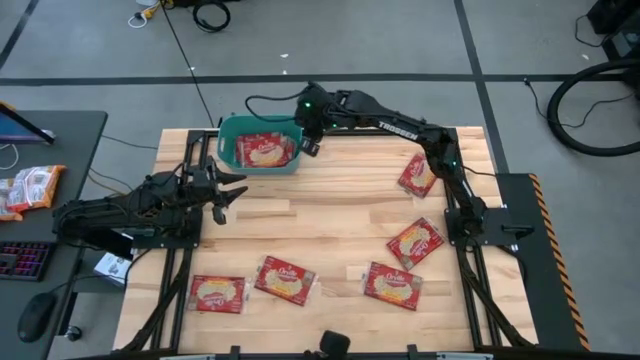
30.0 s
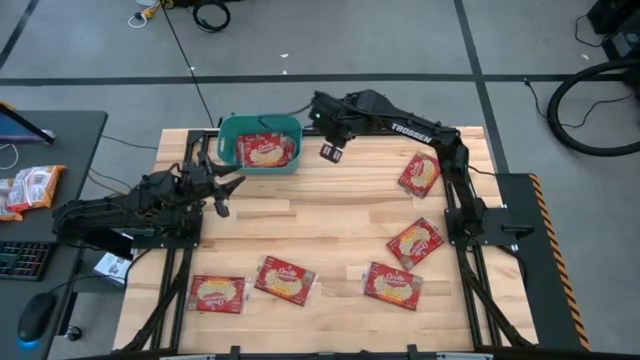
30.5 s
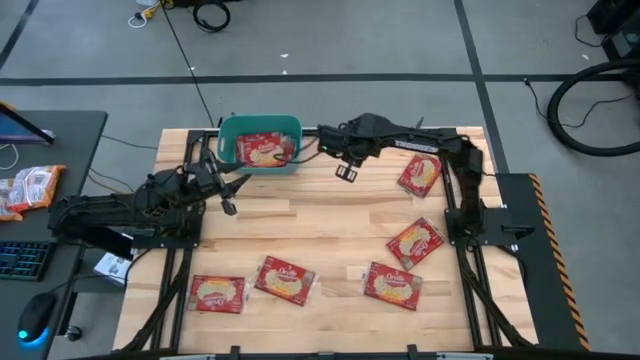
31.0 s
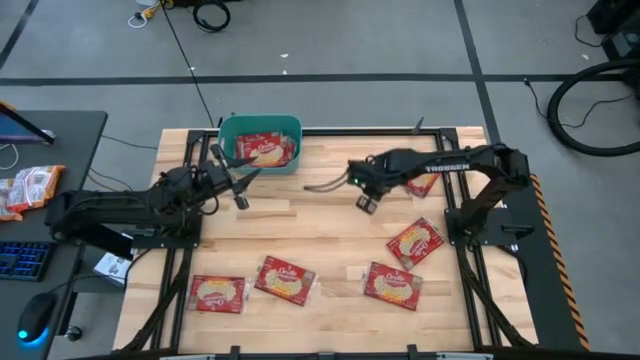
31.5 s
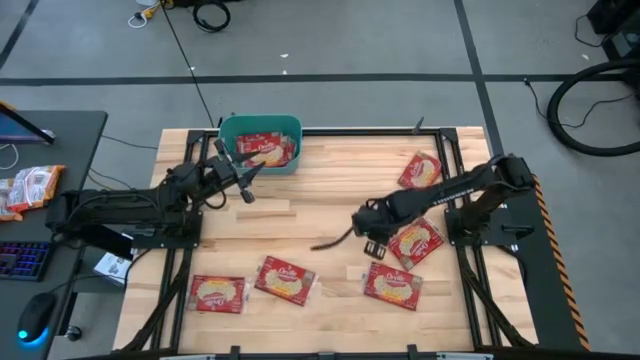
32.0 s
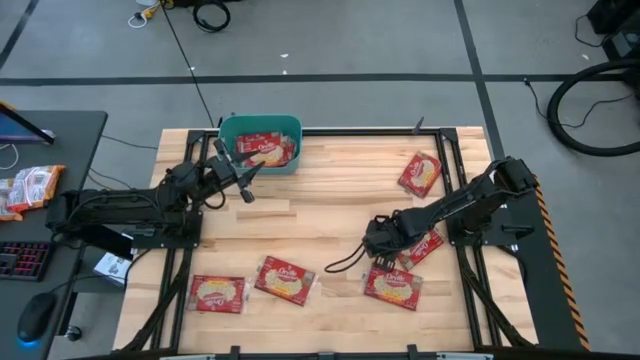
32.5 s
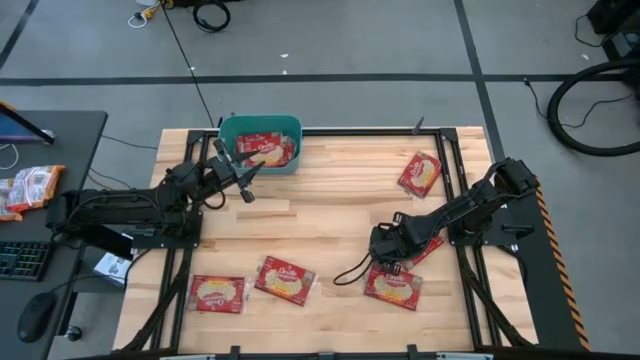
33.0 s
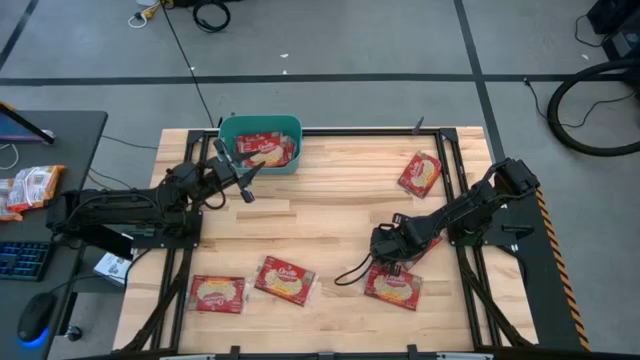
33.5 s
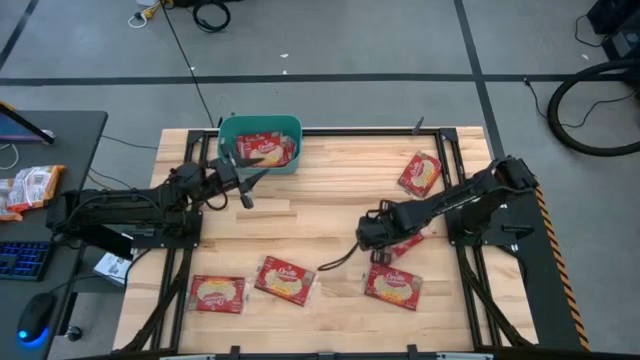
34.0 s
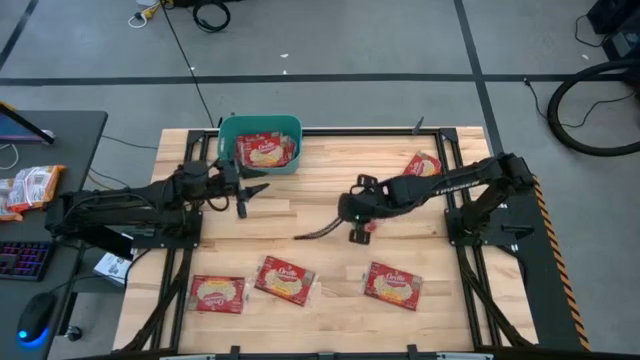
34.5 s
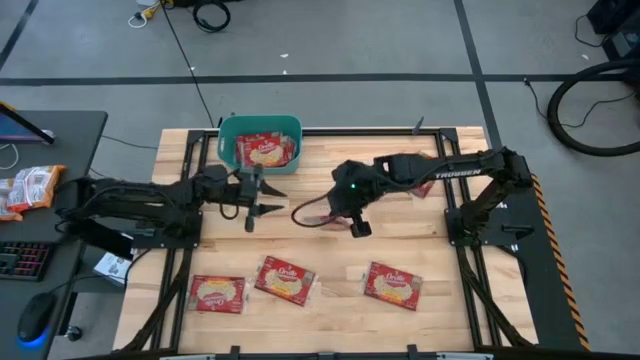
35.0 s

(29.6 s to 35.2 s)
Task: Sort popcorn bags into baskets
Put the popcorn bag into the bin

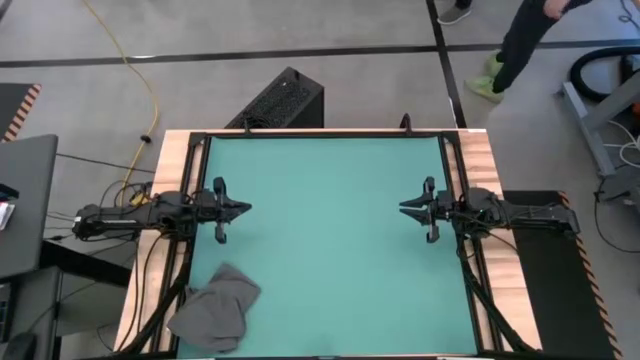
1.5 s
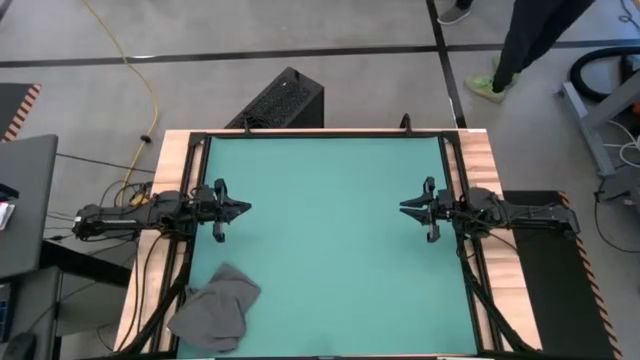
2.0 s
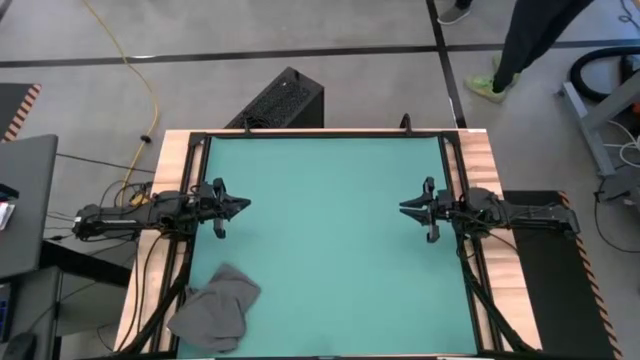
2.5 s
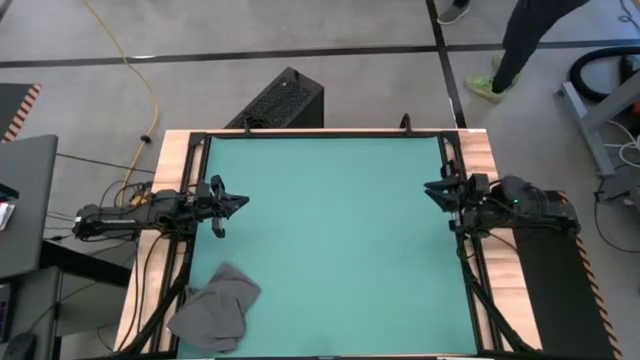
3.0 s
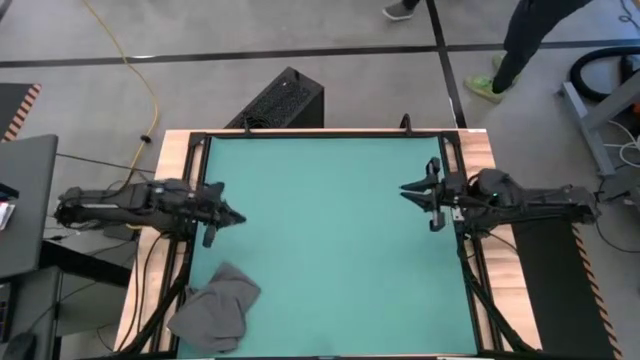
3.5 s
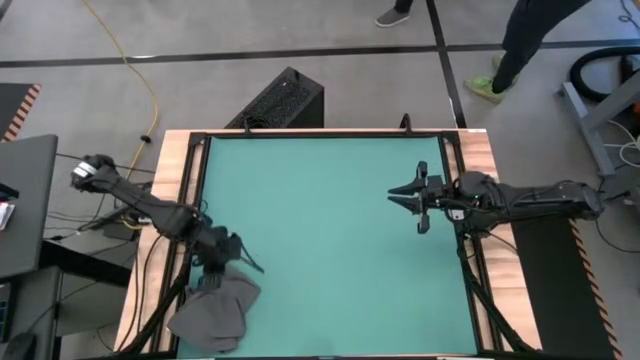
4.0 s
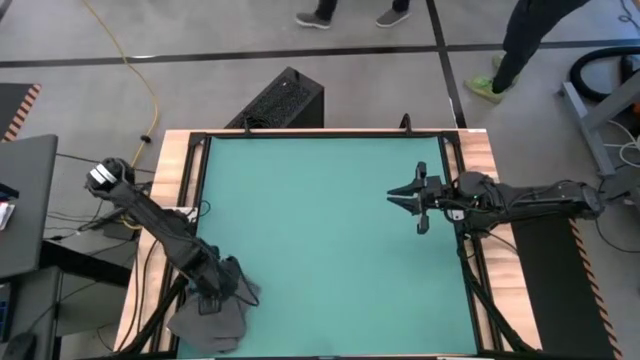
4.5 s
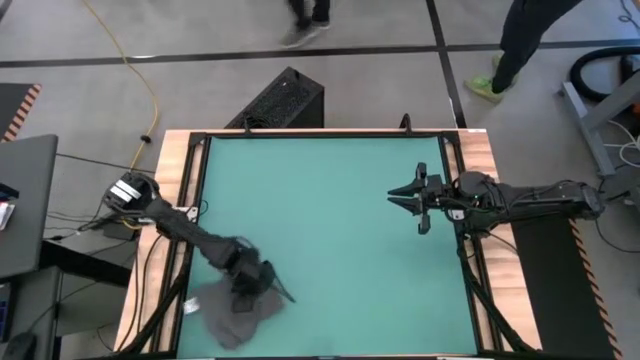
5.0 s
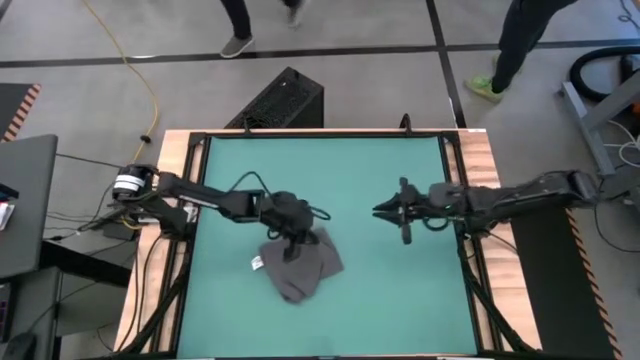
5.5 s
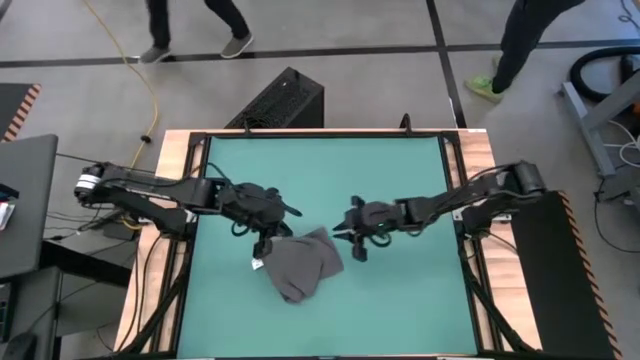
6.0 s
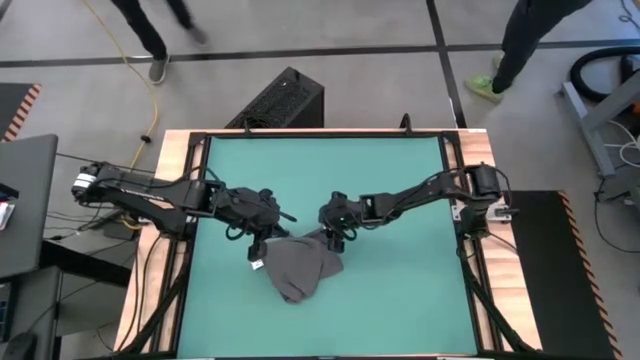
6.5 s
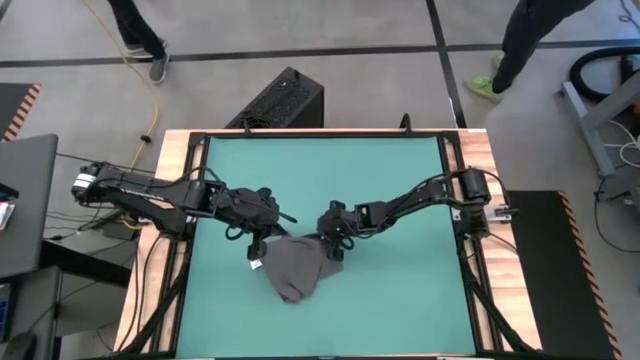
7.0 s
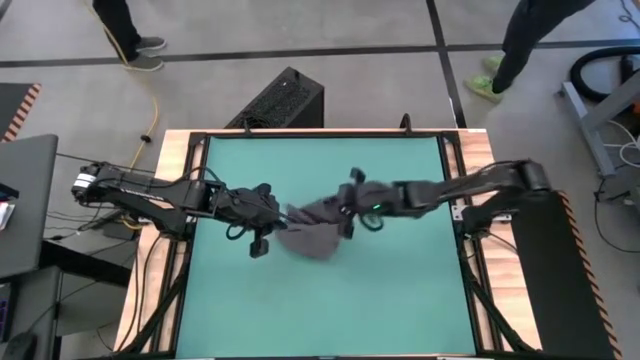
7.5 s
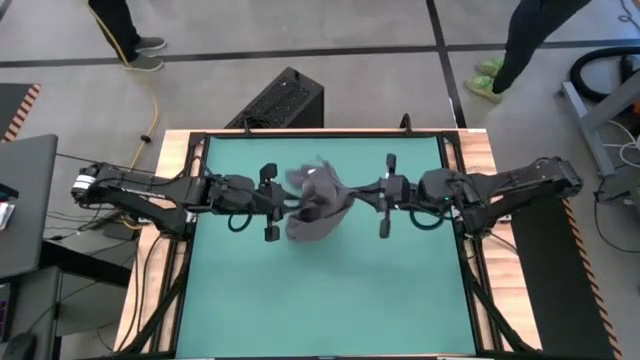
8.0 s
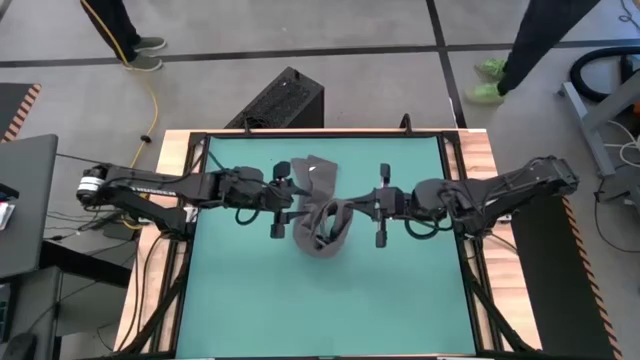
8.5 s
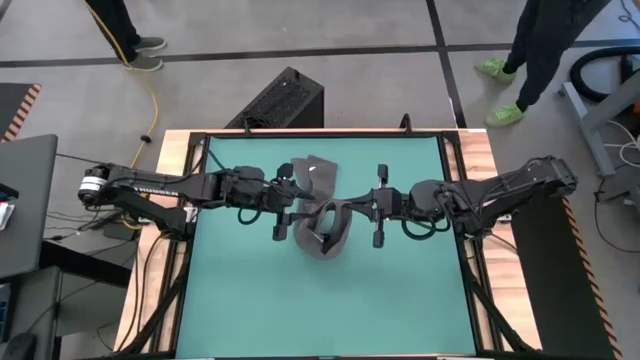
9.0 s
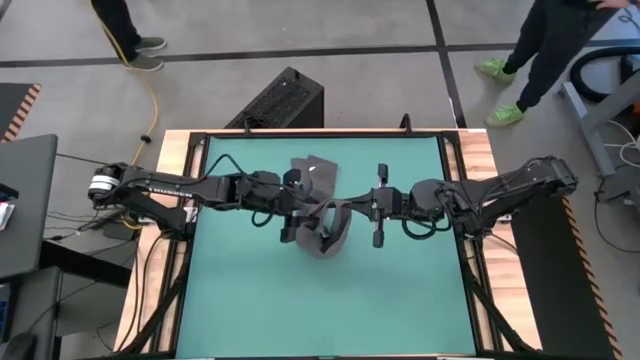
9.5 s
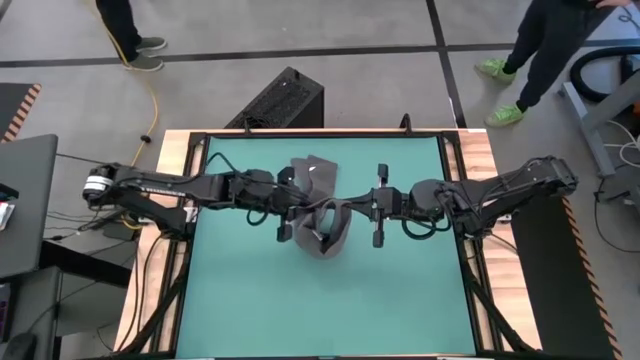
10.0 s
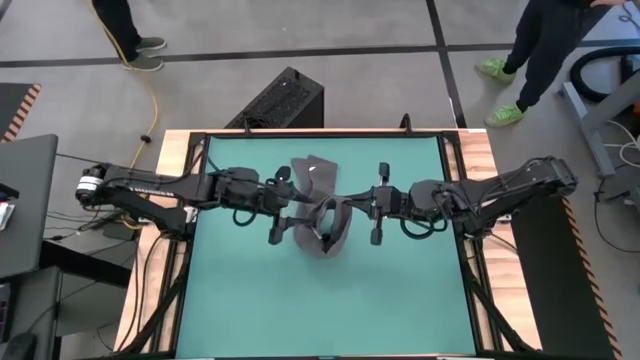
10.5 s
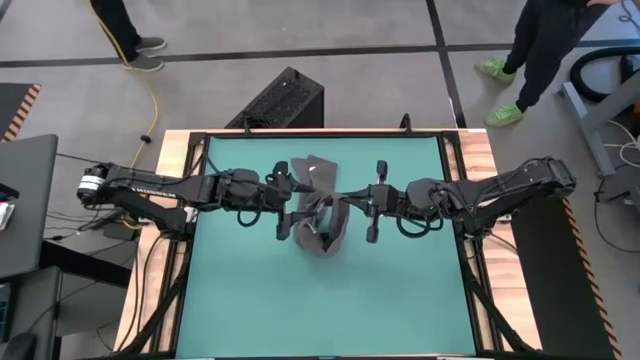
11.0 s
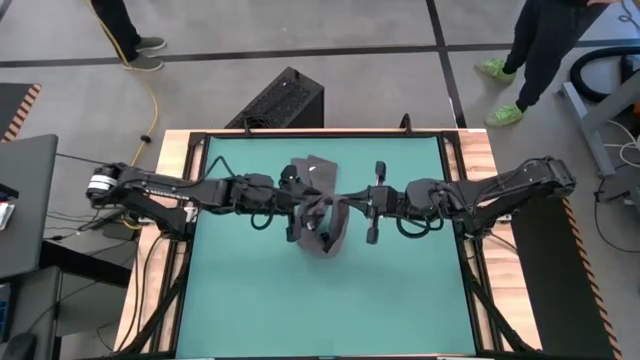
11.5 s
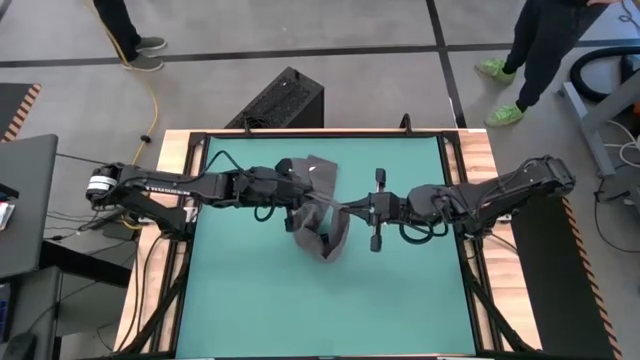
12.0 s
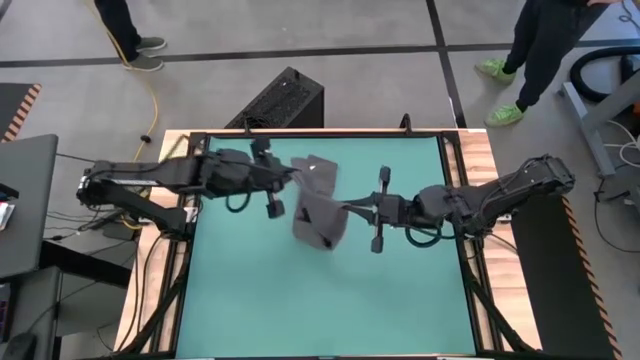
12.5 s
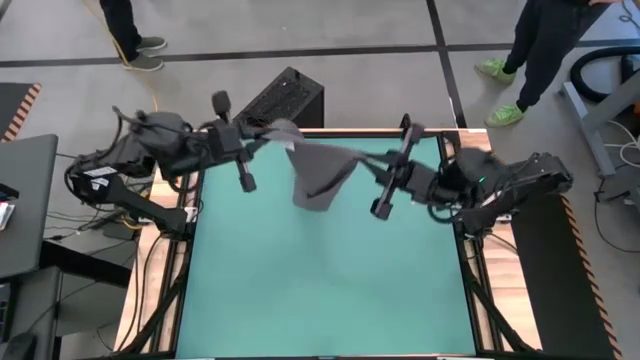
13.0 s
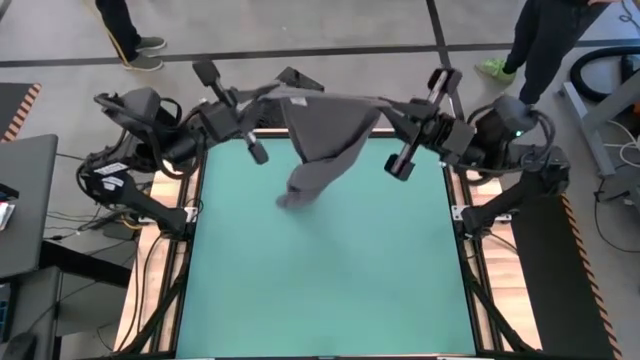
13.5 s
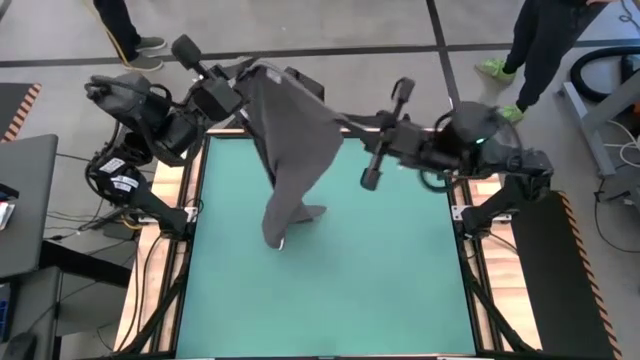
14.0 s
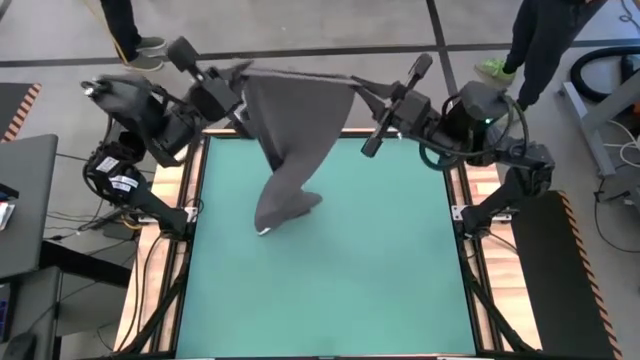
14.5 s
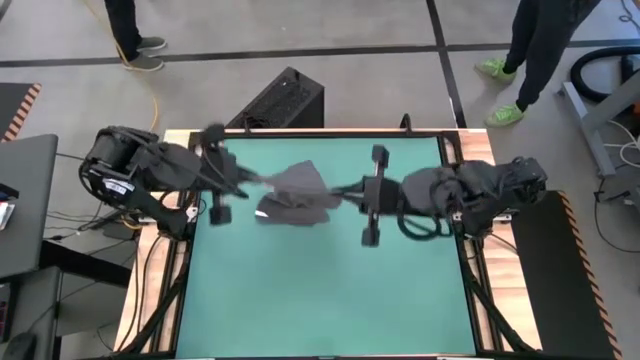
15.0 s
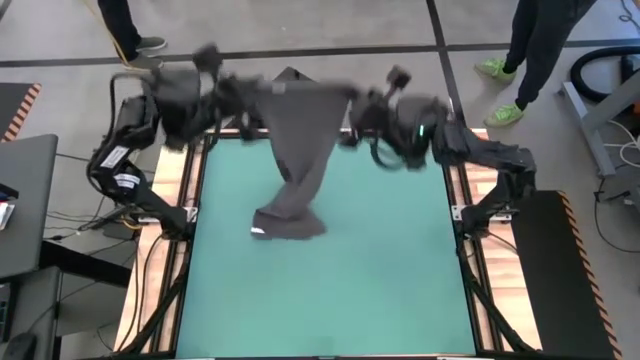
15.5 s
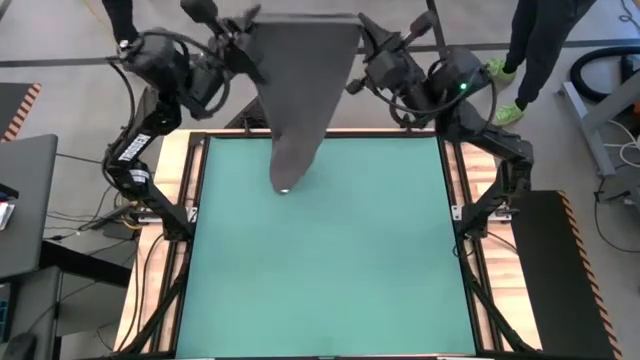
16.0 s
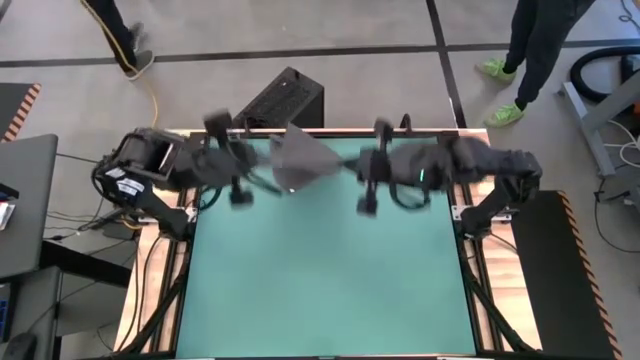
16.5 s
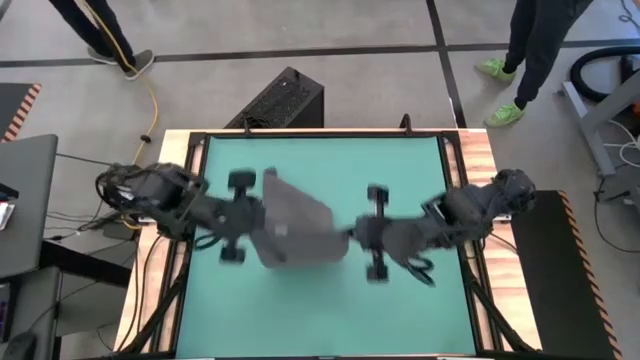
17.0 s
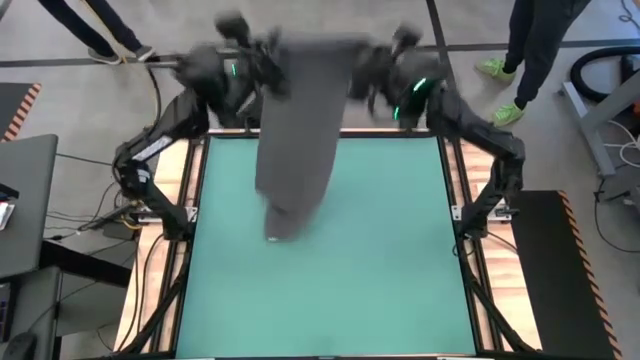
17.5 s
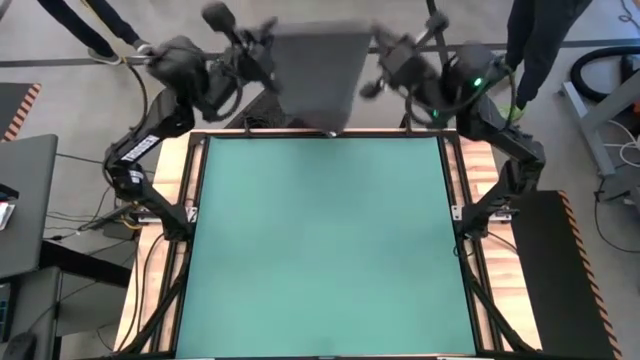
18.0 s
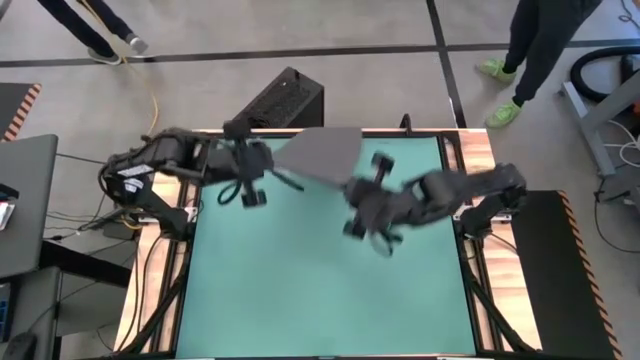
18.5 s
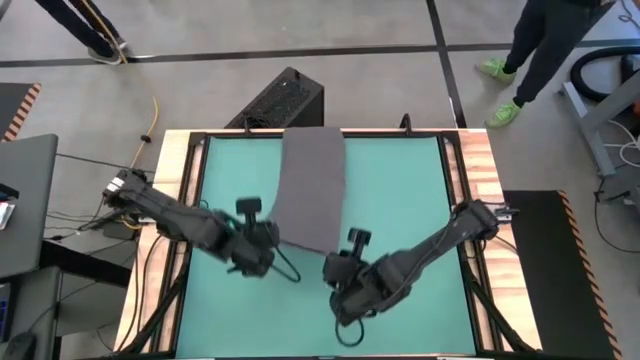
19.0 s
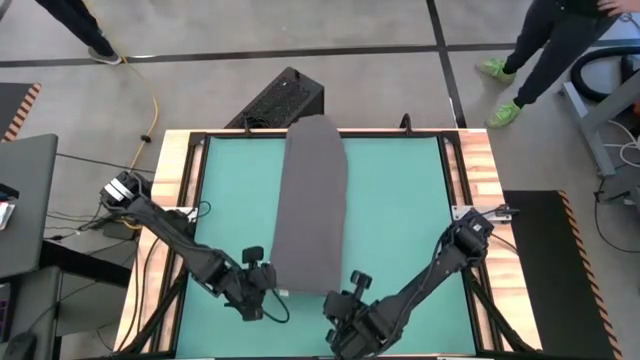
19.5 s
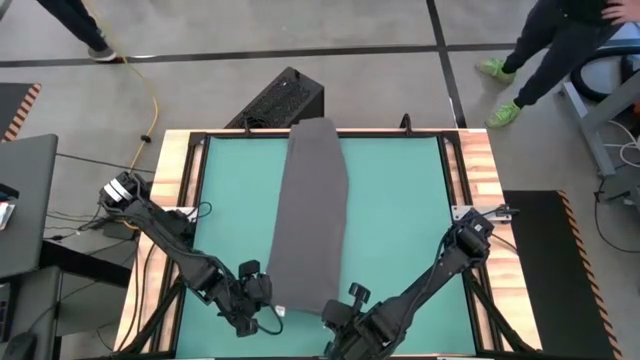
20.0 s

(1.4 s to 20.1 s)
Task: Roll towel into tight, uniform cylinder
Prepare the gray towel
